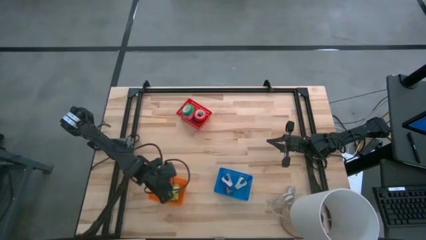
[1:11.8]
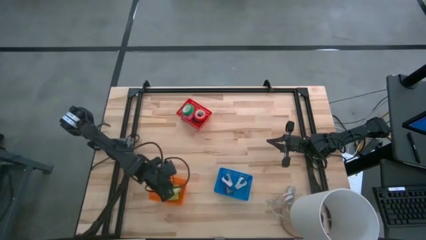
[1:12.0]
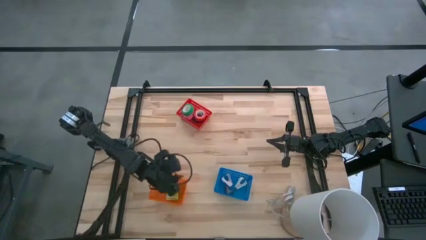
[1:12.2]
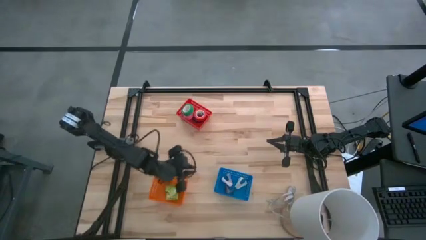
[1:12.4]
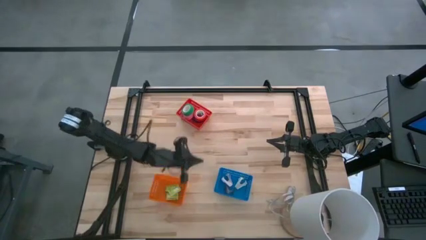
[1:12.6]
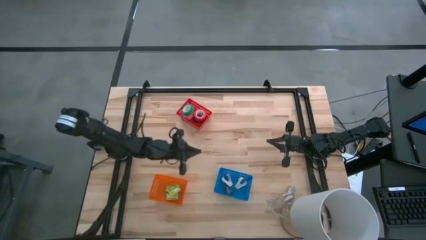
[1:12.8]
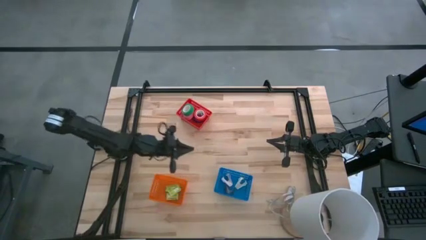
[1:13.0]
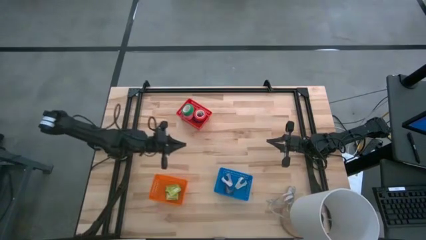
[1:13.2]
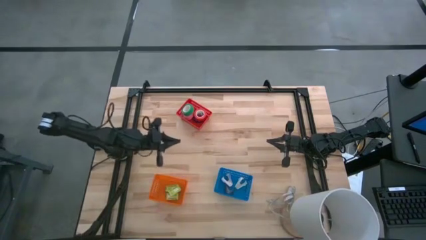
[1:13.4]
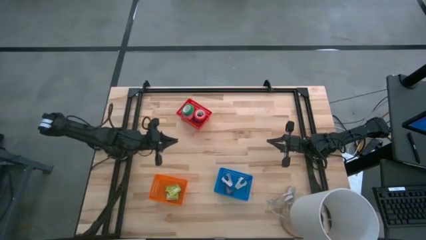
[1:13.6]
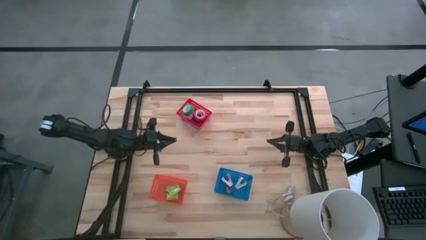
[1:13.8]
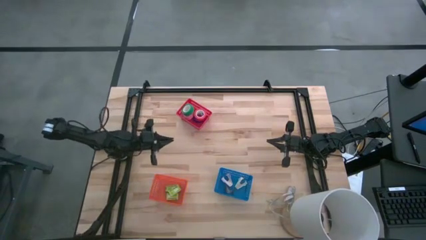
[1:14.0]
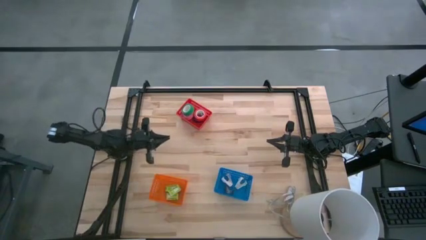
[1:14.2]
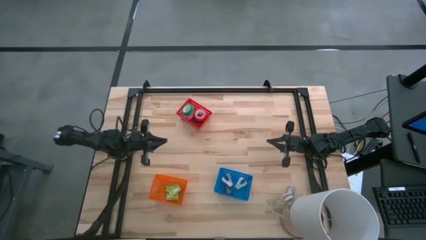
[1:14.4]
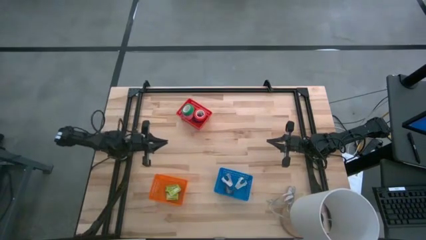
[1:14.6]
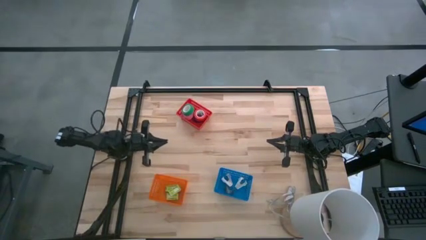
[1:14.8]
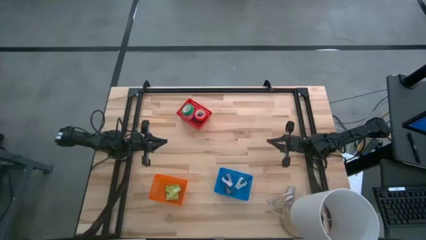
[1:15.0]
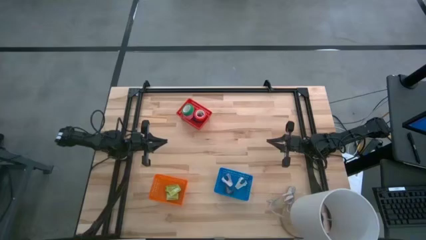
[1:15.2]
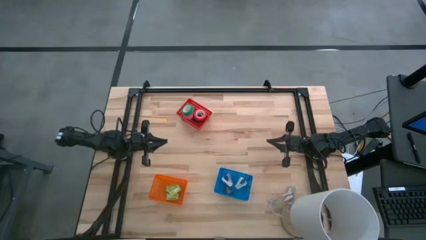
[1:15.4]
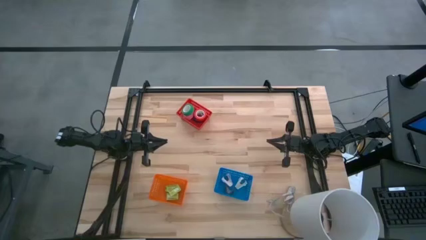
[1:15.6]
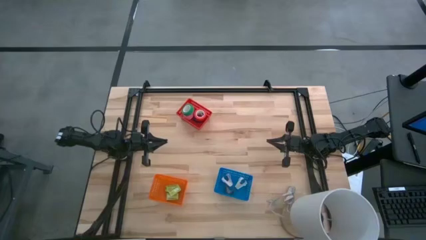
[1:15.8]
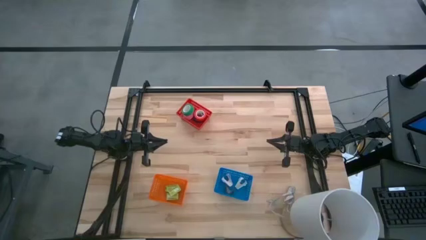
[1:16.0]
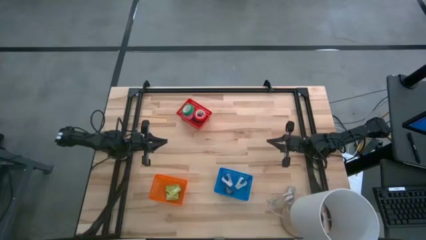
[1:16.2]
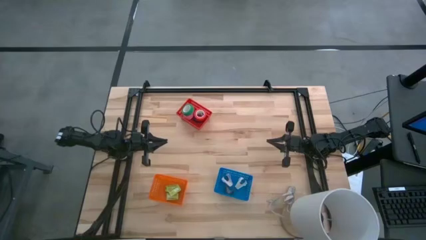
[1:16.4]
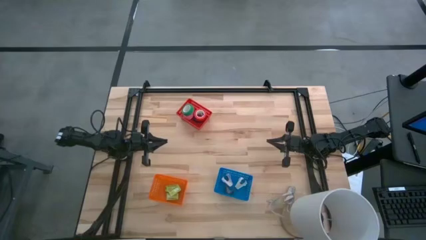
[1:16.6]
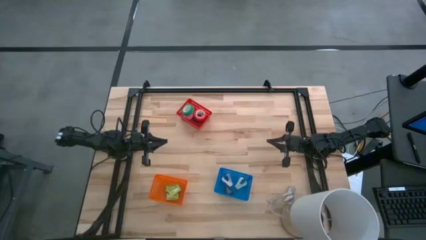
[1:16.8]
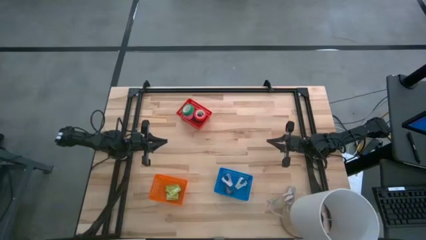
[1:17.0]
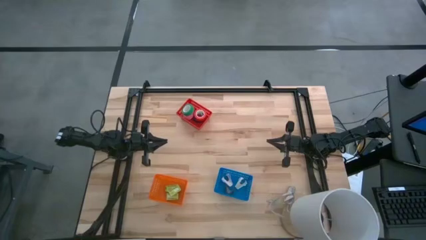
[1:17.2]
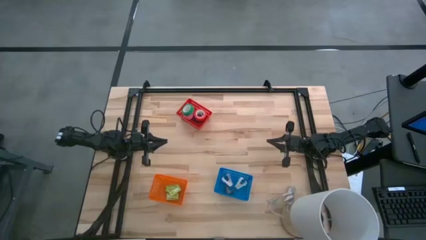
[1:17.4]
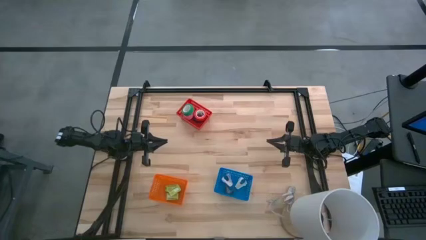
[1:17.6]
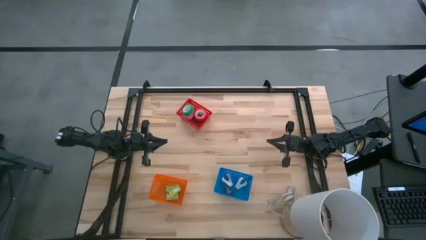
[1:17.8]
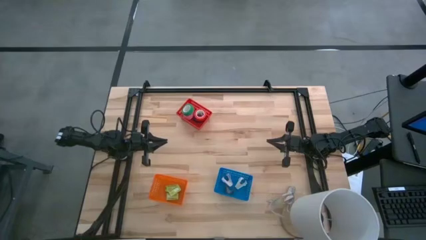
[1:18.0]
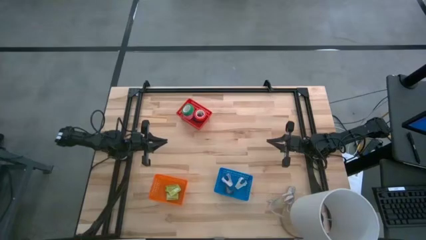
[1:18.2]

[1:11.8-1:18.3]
Task: Pick and place Stapler, Stapler remover, tape
Return to Home Position

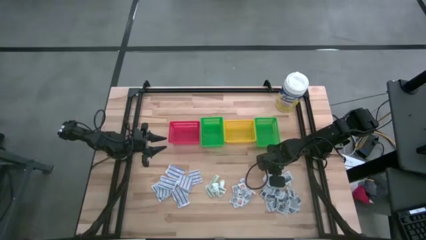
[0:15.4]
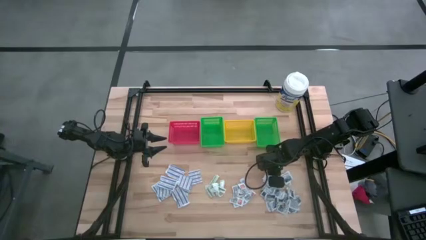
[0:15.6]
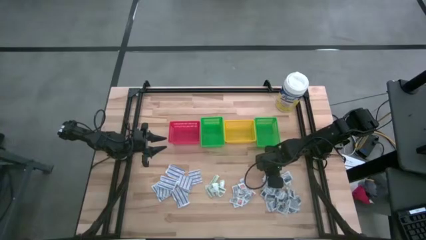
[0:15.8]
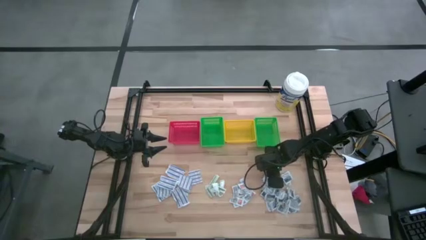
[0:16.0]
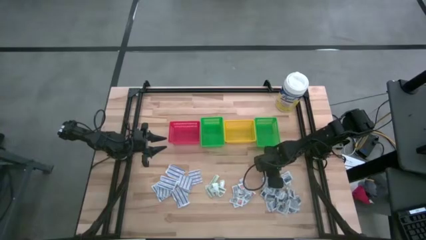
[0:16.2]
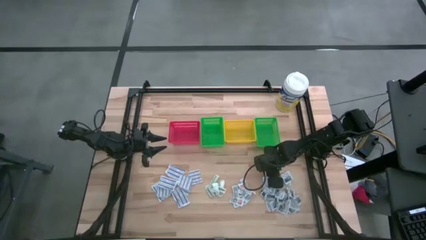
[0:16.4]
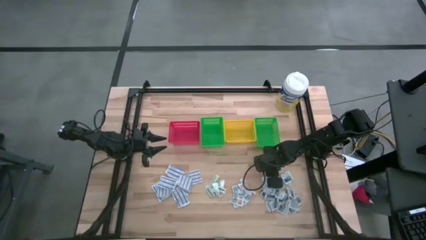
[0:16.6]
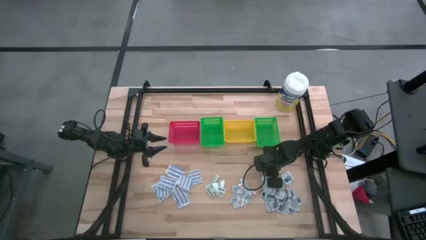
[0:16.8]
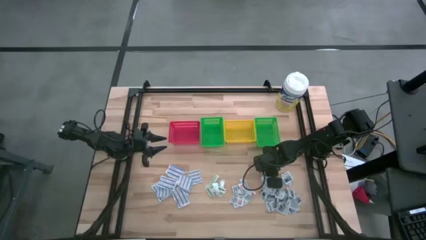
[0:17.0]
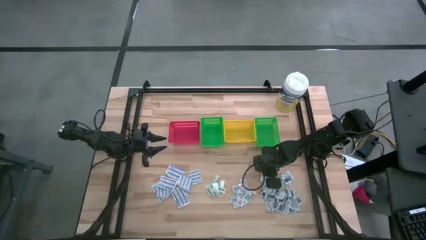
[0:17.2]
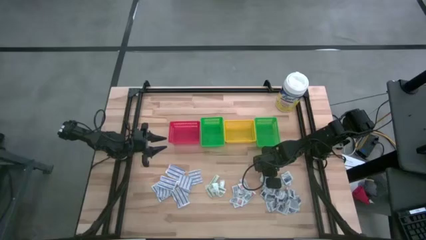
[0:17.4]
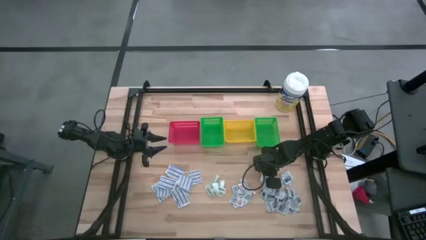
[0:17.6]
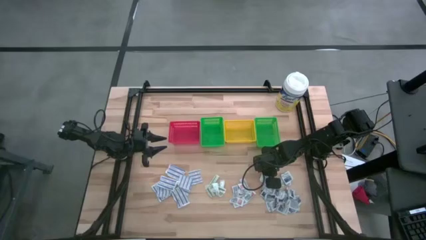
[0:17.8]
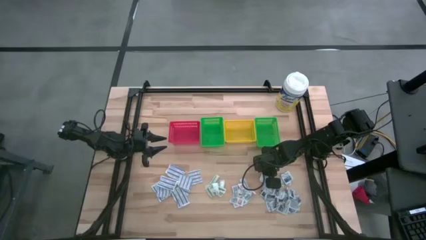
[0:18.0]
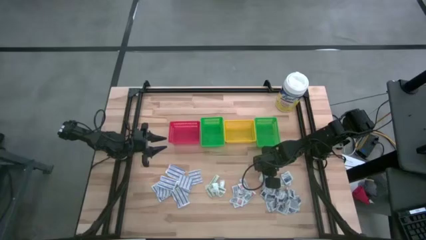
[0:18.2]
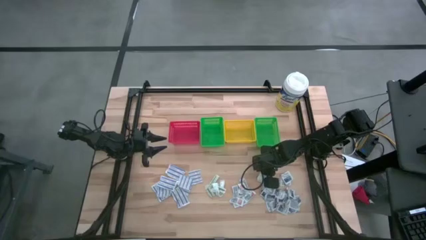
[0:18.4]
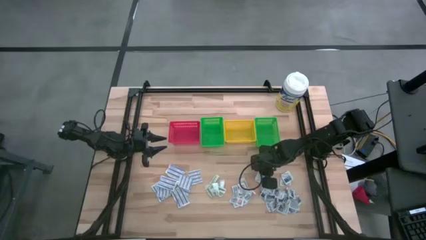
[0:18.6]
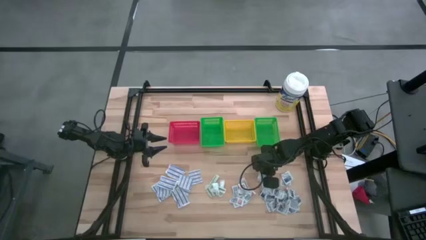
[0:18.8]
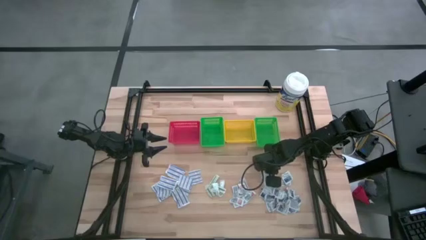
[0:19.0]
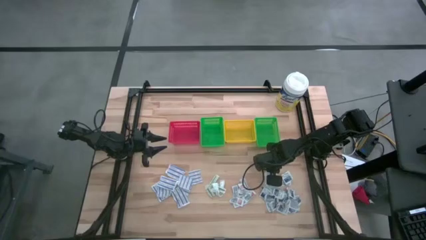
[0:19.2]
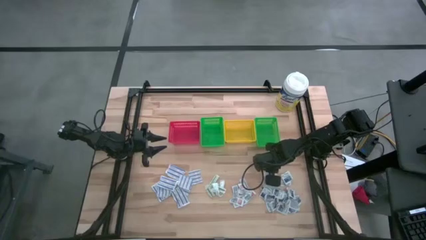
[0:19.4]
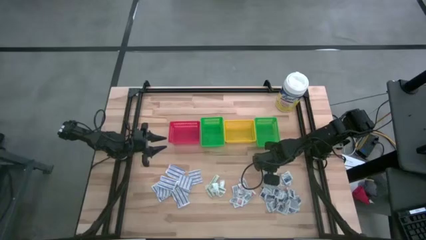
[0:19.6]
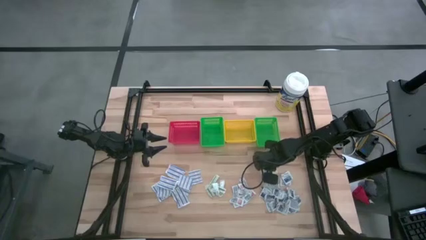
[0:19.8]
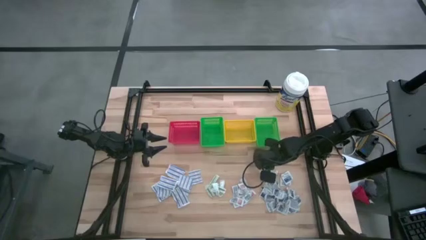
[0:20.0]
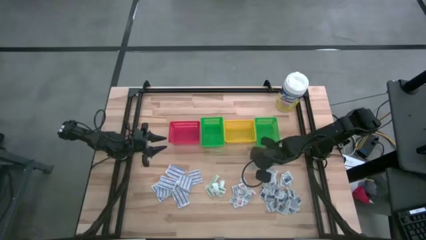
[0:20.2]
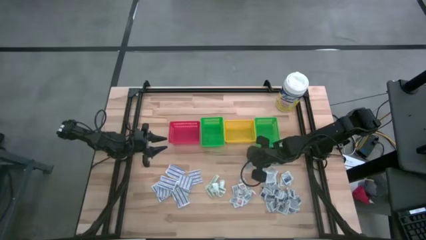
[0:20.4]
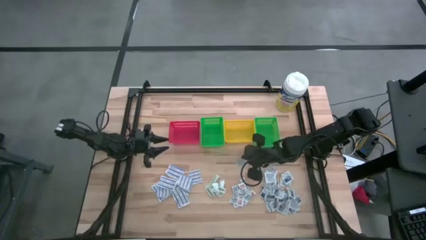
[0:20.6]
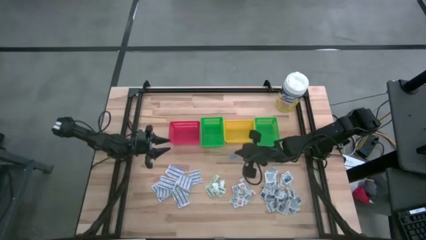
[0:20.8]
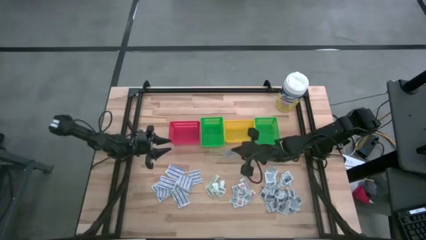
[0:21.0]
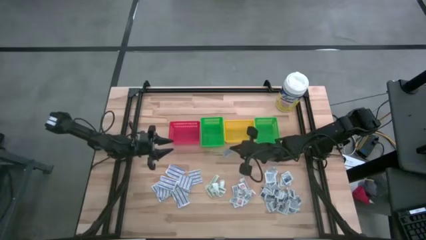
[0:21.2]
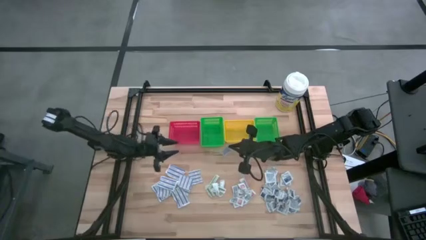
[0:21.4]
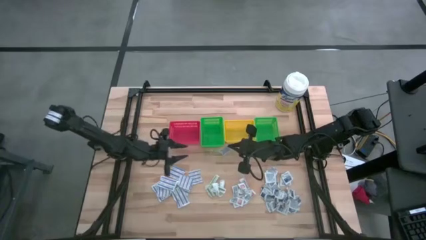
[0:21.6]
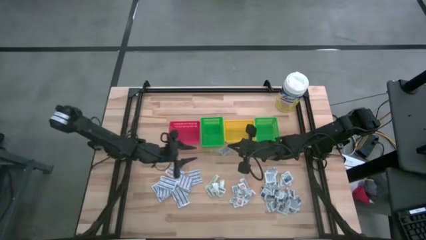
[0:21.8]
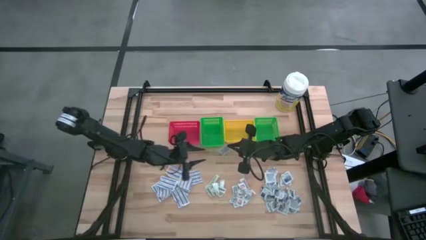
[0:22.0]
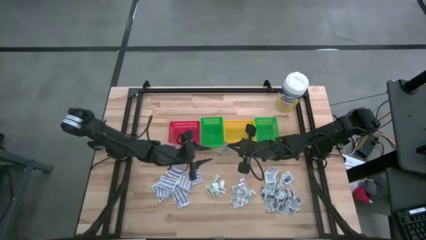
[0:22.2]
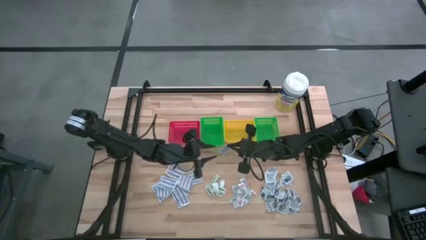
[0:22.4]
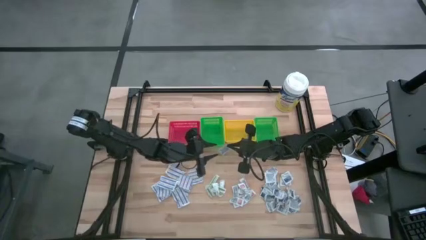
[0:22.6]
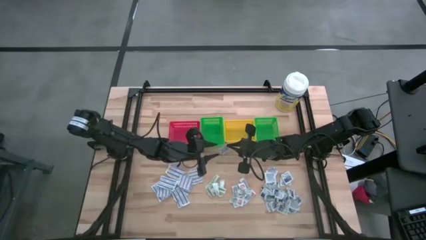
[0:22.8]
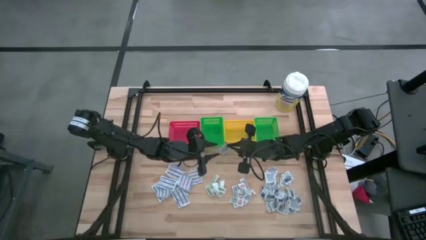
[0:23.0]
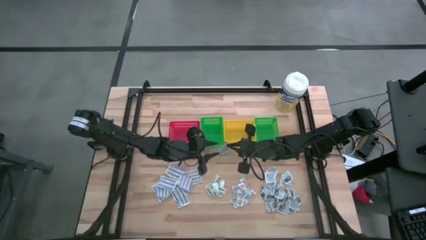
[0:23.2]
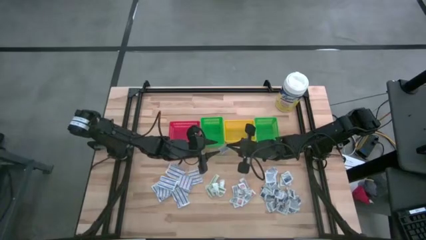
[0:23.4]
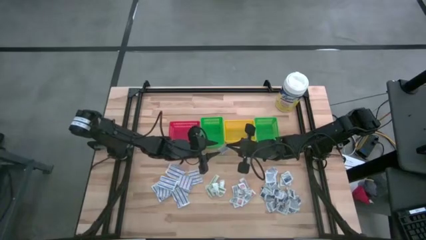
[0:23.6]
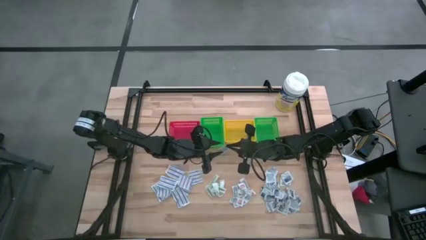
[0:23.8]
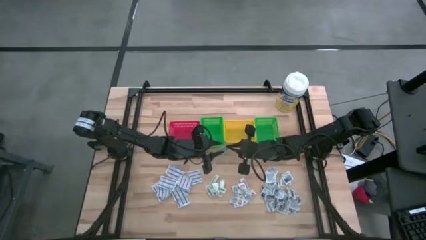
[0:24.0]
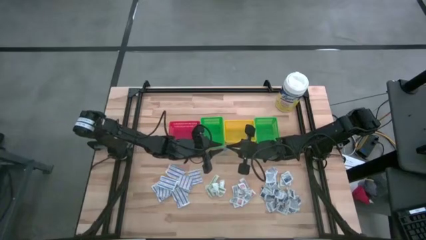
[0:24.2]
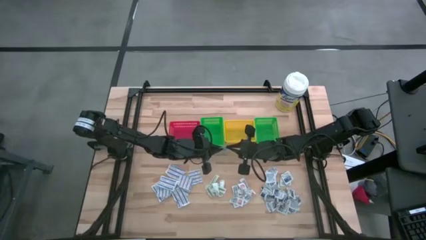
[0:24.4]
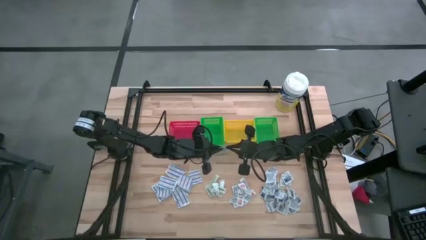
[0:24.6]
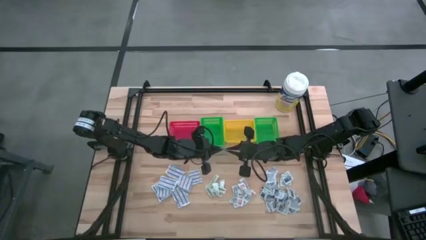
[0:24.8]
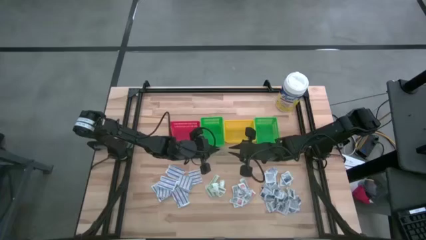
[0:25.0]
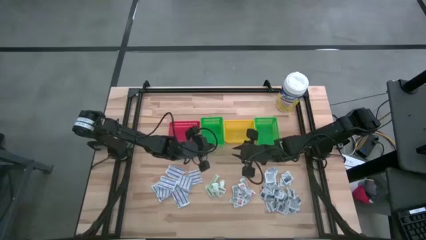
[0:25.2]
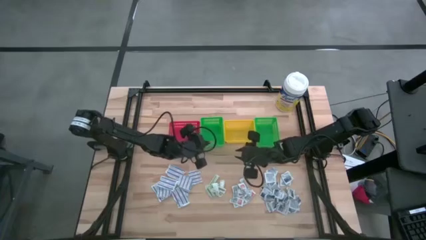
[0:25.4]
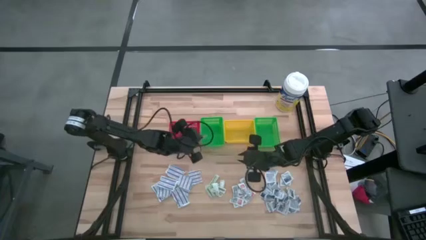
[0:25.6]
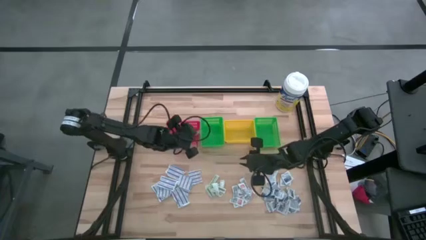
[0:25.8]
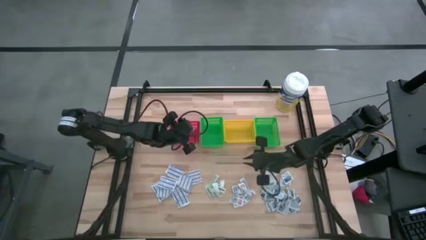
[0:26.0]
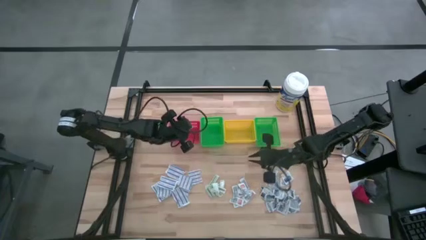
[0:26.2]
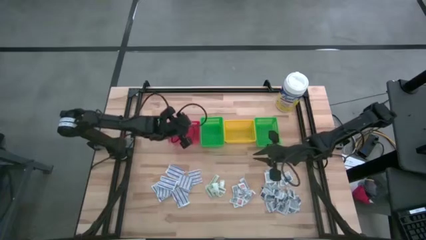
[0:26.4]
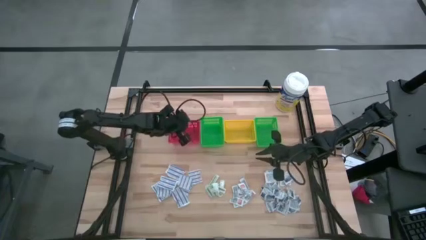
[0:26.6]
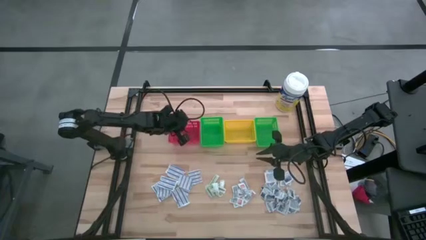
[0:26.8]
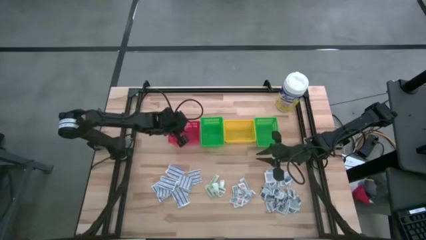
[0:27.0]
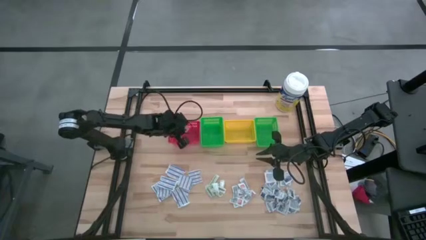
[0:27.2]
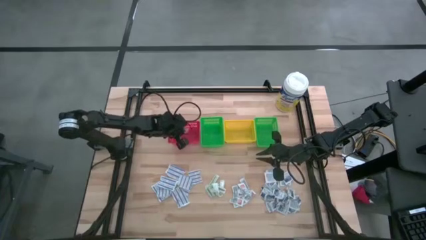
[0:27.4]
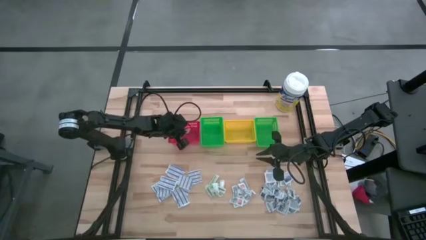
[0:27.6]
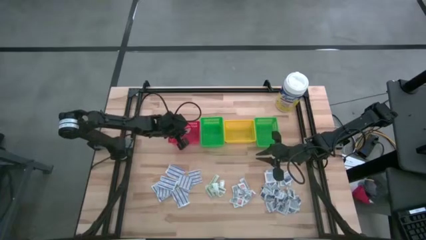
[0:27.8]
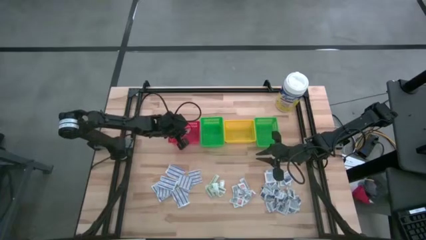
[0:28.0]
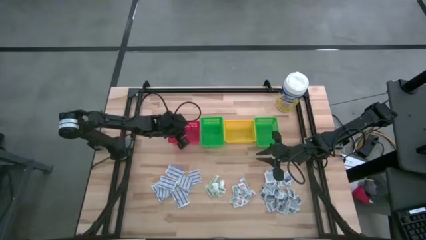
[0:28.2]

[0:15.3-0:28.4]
Task: Pick & Place First Aid Supplies
Put the alcohol pad into the red basket
